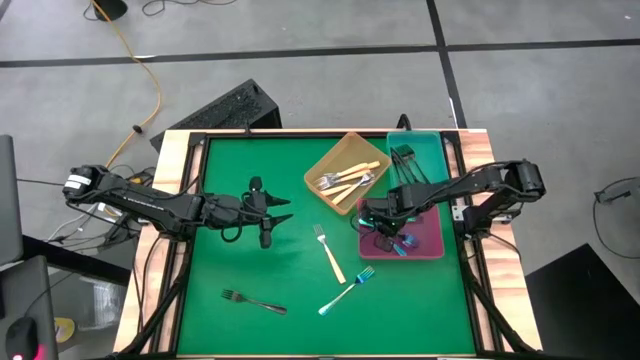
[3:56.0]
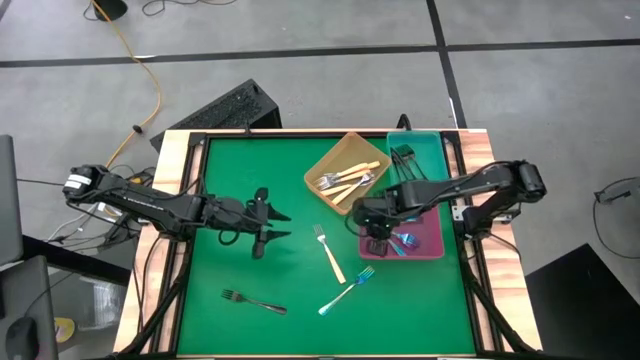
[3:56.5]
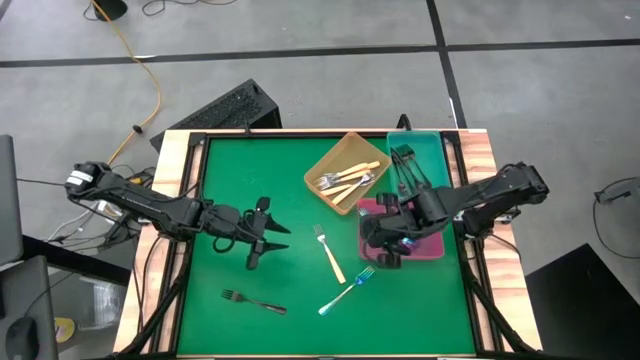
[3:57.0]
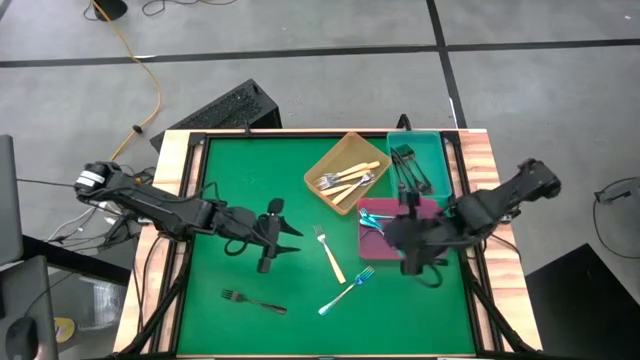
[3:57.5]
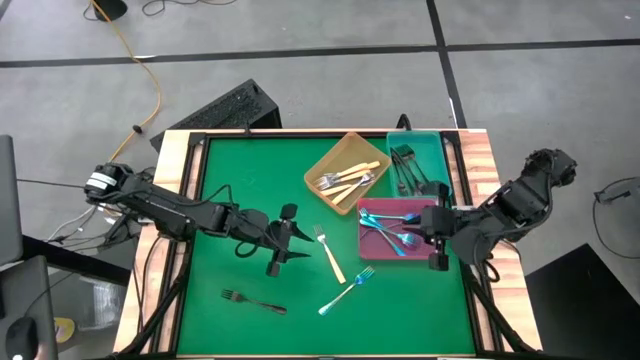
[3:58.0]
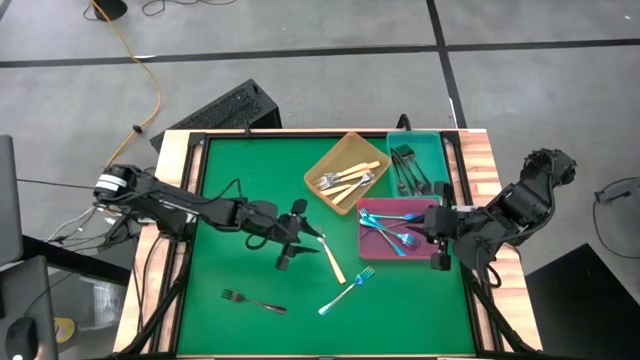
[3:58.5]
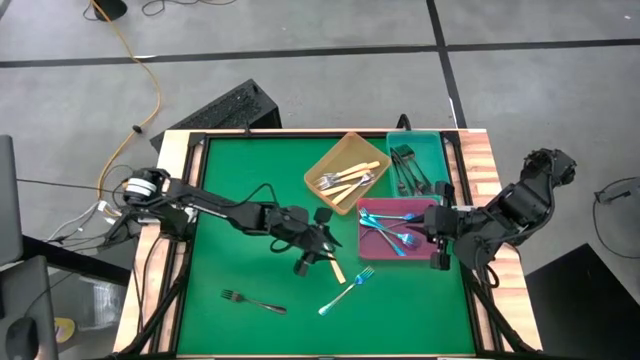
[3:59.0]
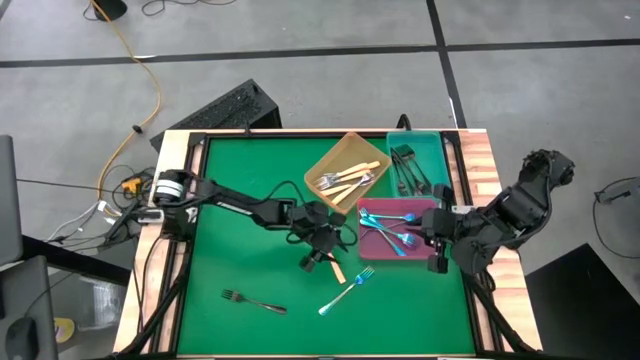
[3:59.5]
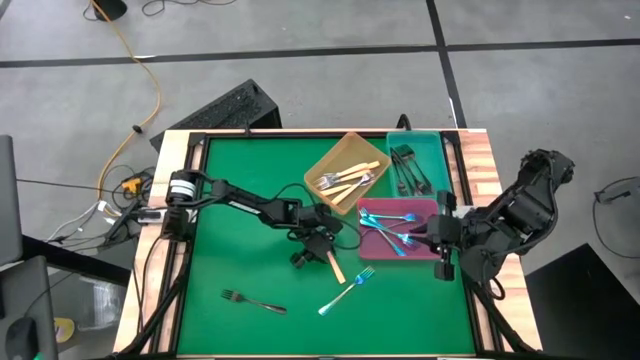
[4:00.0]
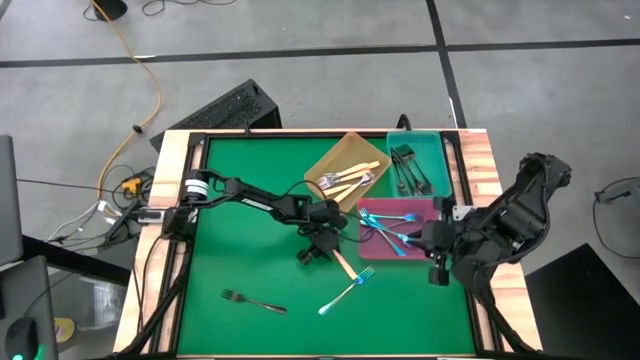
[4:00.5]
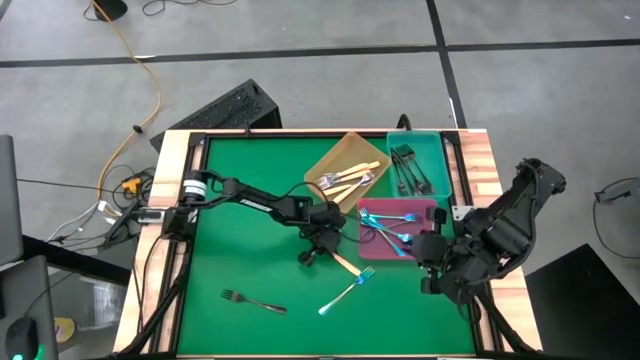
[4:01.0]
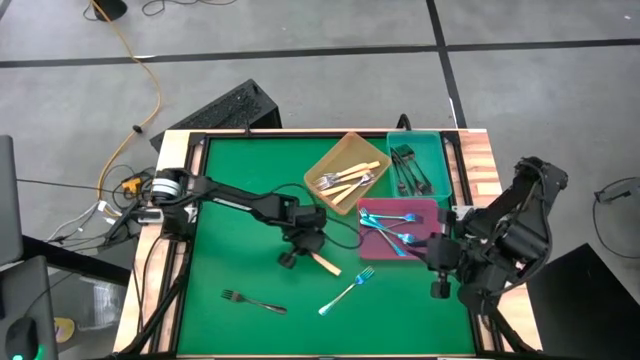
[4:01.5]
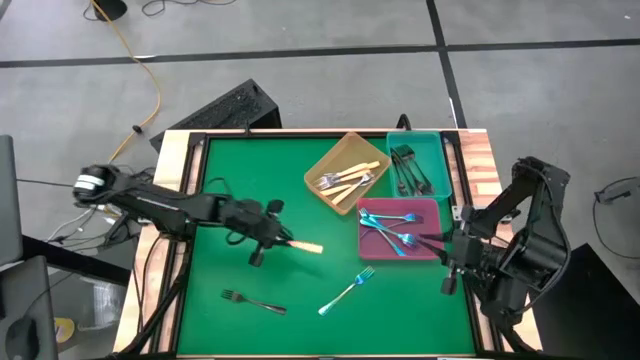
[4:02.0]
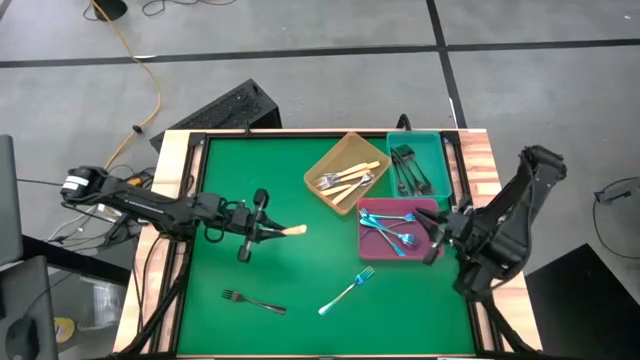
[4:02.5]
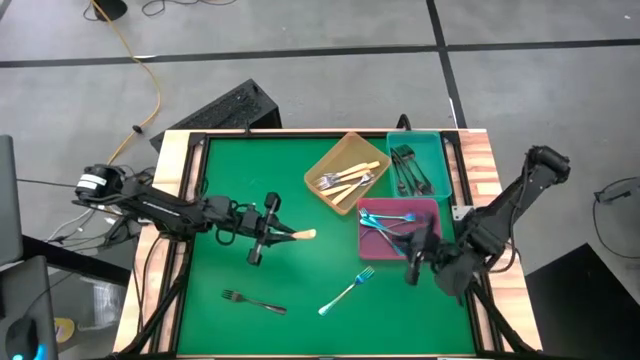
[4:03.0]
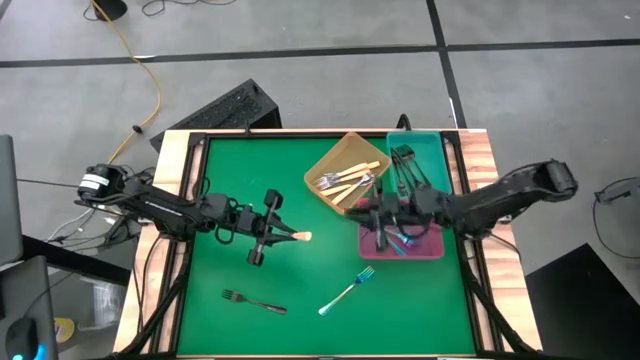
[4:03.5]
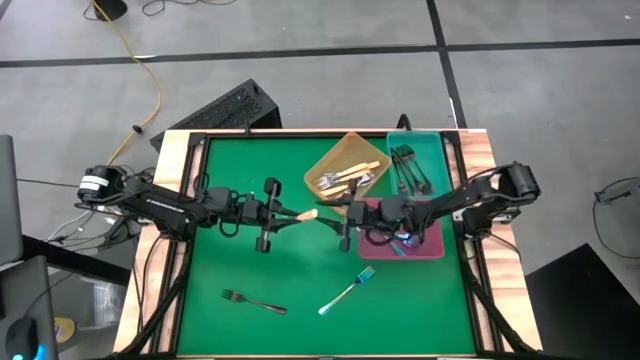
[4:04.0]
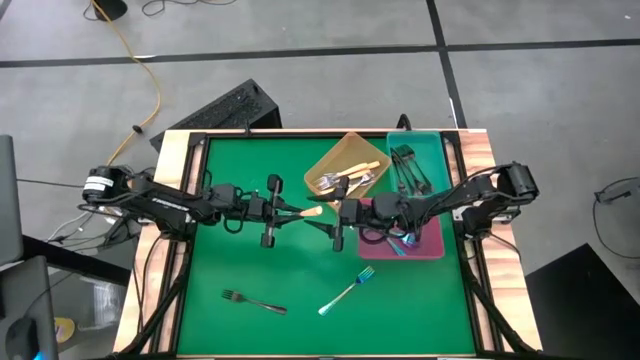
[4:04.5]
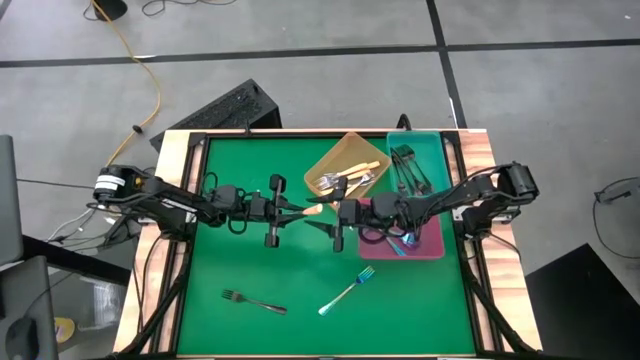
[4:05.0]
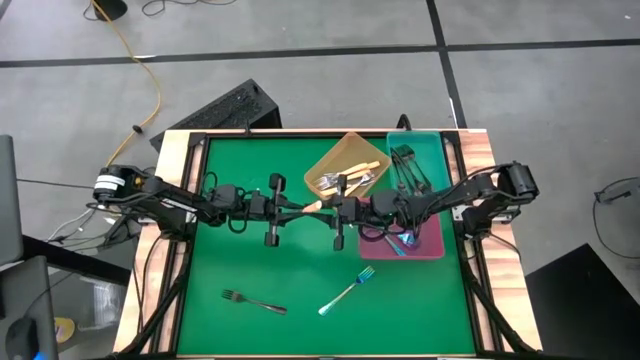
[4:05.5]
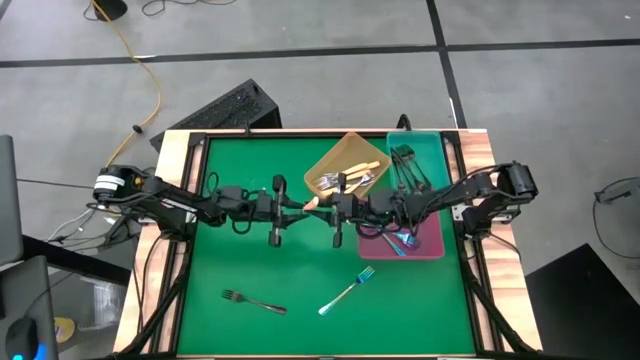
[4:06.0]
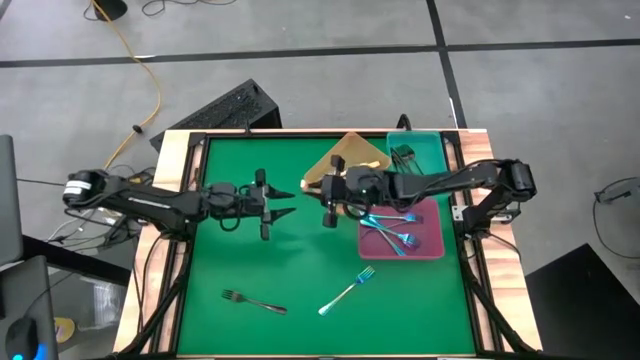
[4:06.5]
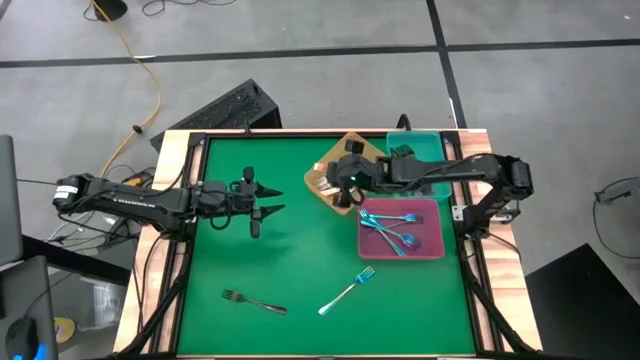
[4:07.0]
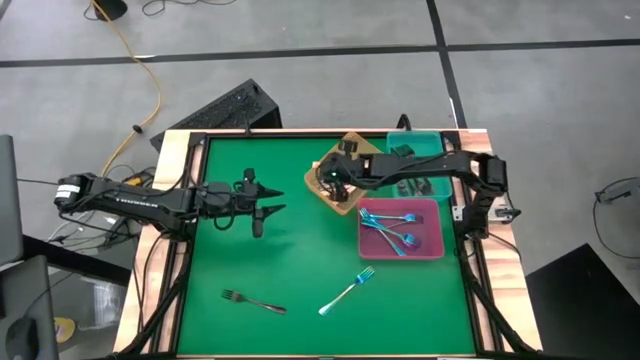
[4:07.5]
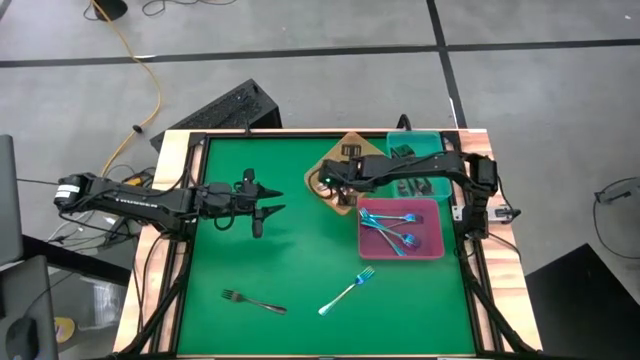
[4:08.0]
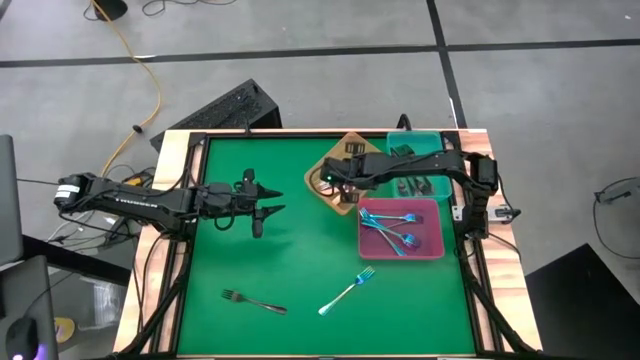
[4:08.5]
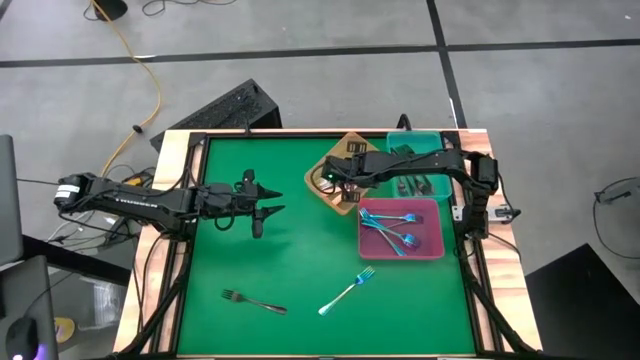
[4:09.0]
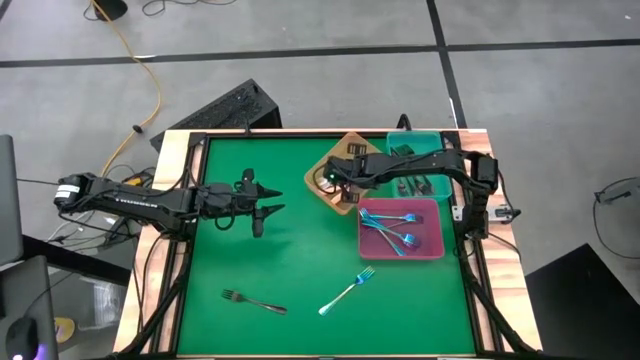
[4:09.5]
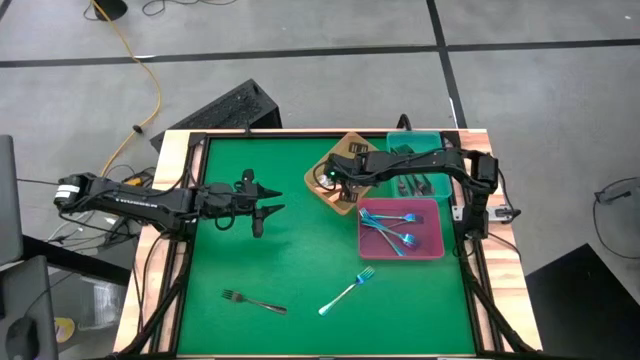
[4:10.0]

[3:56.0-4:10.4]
Task: Sort silverware by color (type)
Put the orange fork into the orange bin

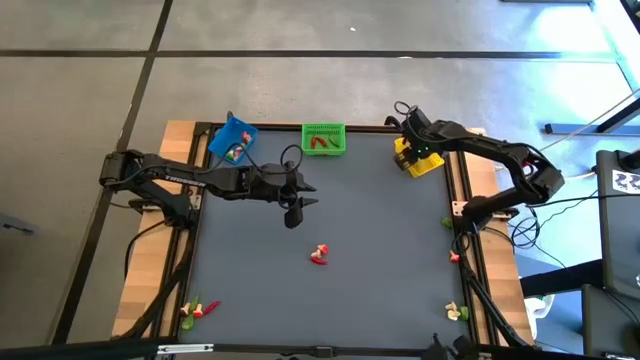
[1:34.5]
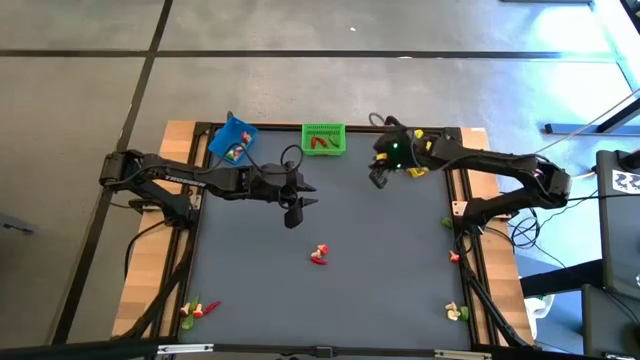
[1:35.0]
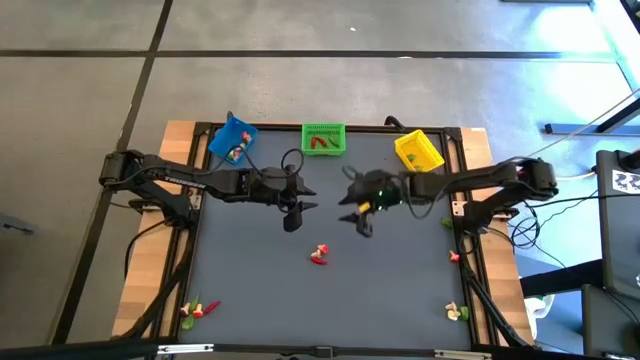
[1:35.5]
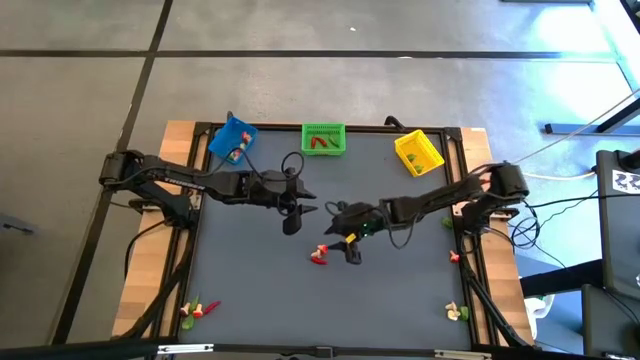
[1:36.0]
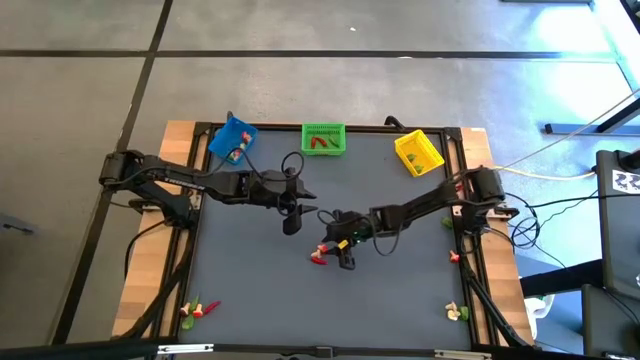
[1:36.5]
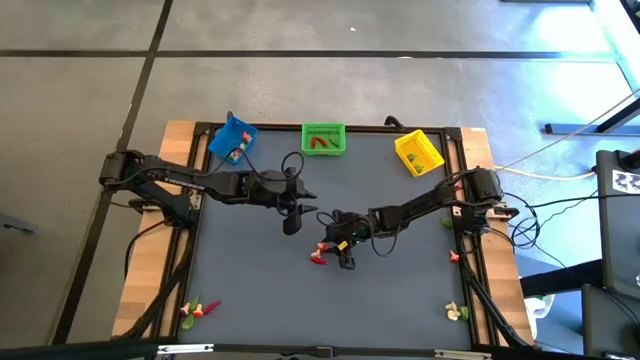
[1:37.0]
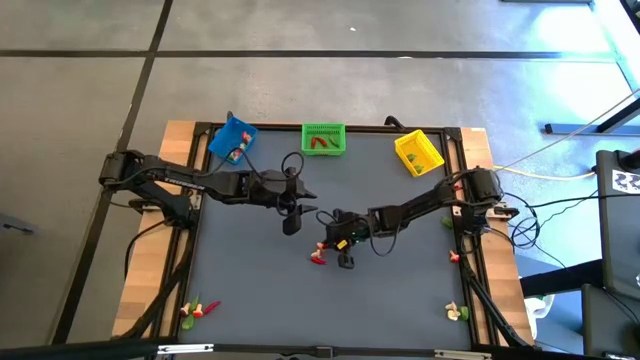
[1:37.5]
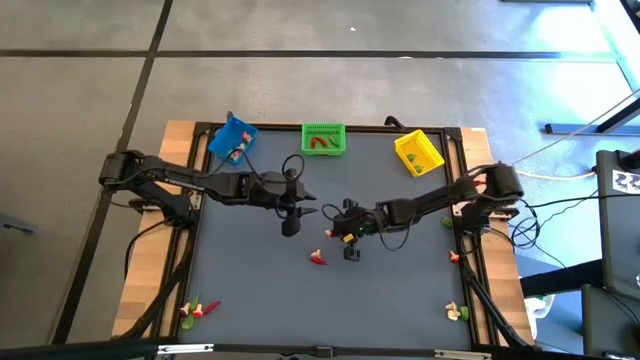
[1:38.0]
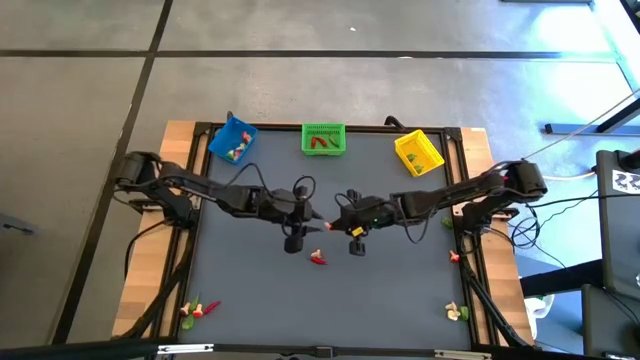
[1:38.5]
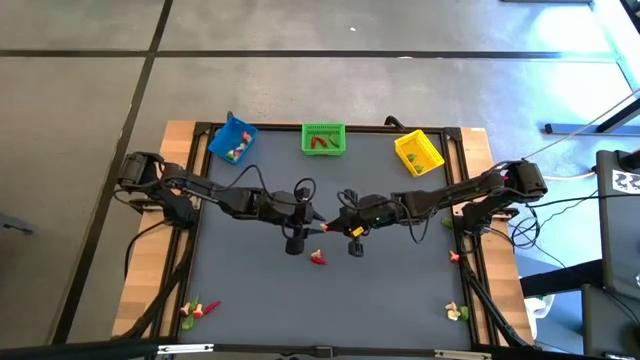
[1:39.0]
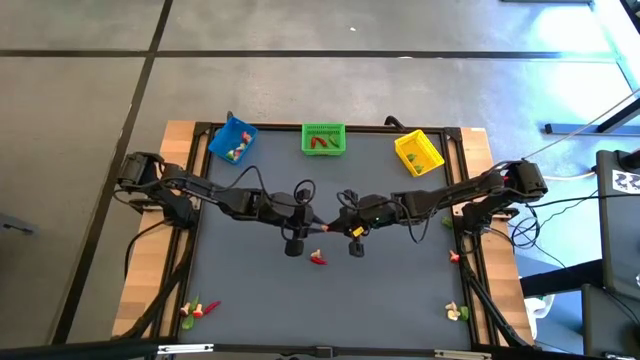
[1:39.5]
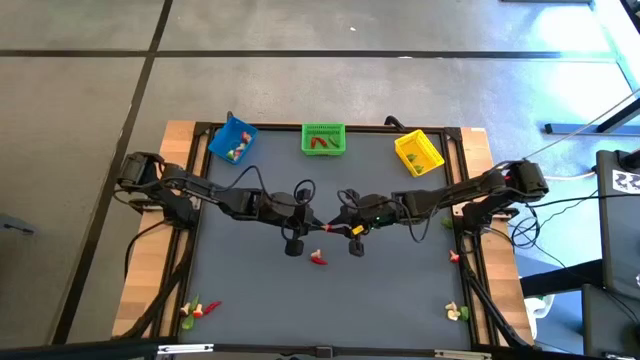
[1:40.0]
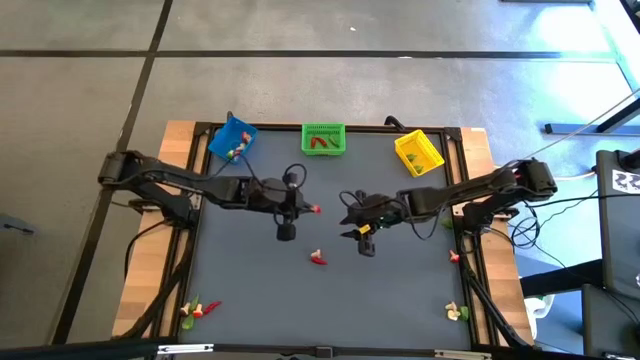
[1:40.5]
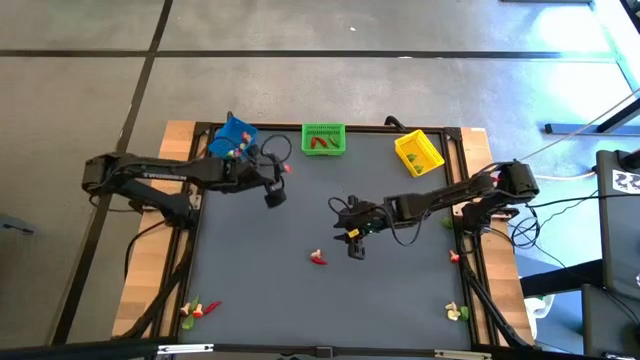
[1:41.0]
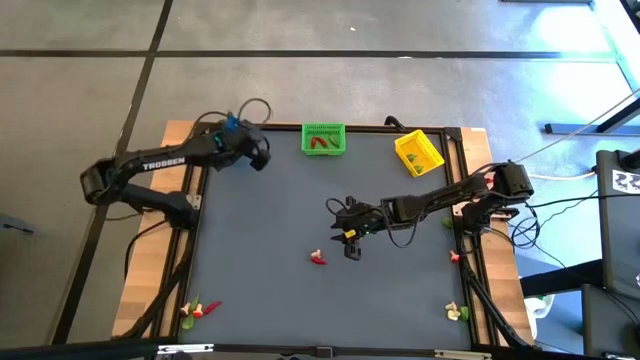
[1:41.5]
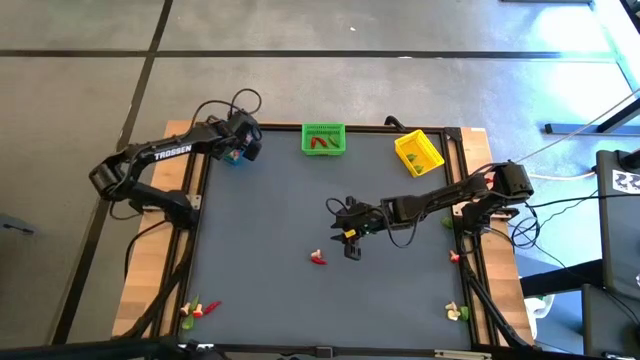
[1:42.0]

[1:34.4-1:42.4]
Task: Sort produce into baskets
Put the red mushroom into the blue bin
